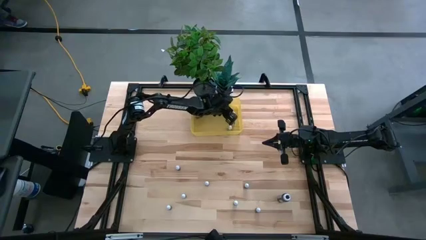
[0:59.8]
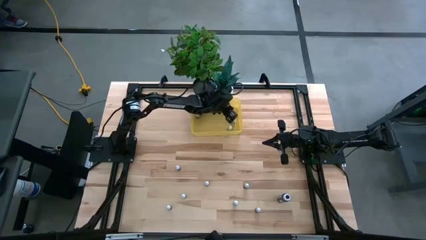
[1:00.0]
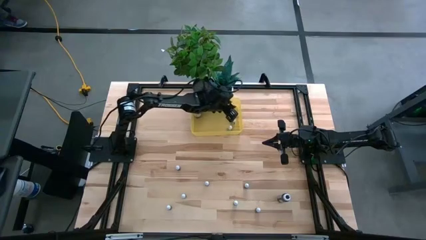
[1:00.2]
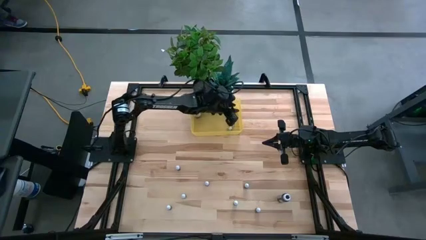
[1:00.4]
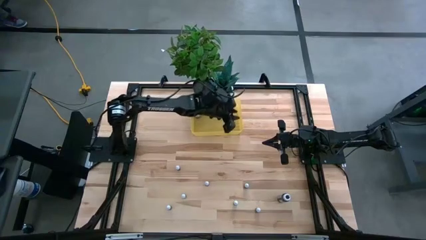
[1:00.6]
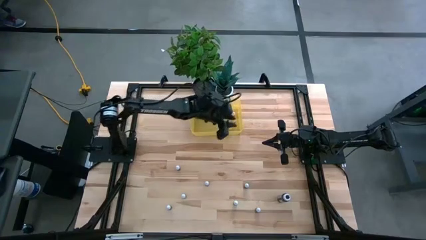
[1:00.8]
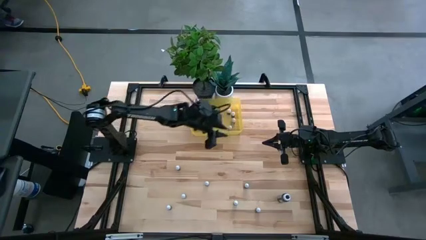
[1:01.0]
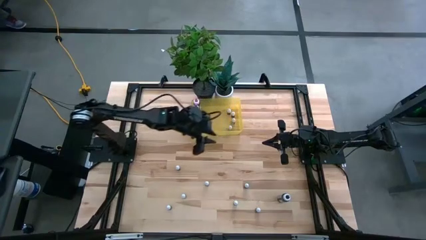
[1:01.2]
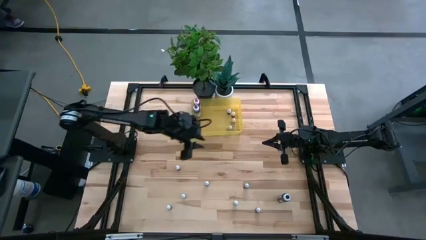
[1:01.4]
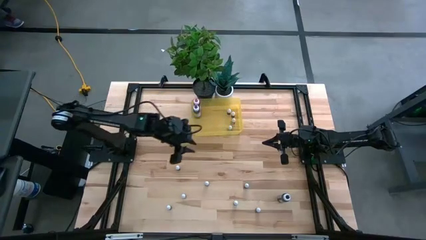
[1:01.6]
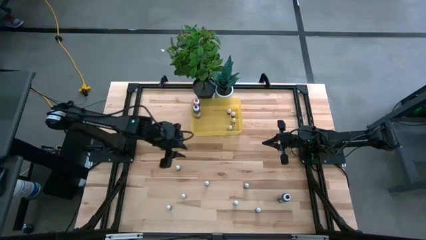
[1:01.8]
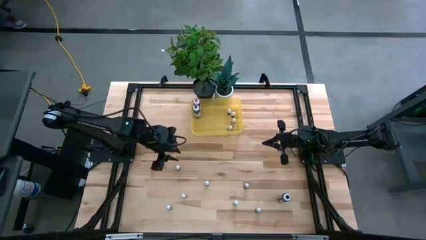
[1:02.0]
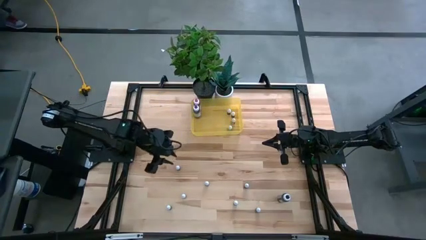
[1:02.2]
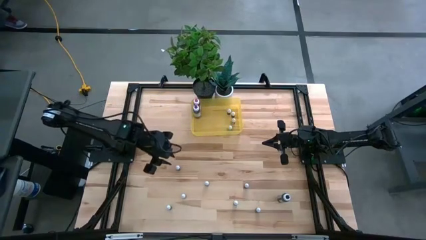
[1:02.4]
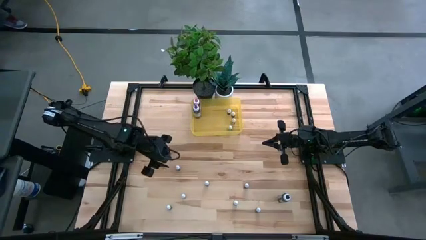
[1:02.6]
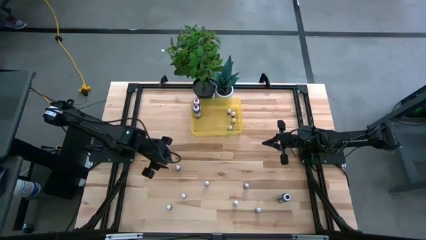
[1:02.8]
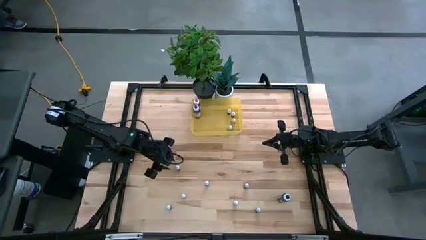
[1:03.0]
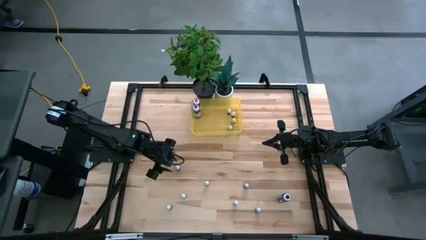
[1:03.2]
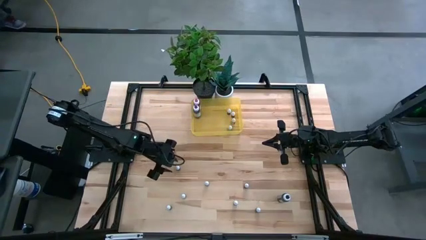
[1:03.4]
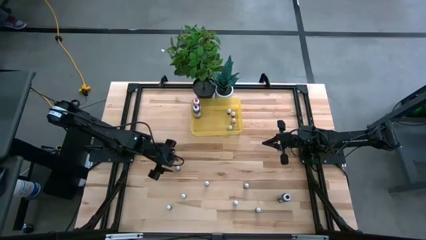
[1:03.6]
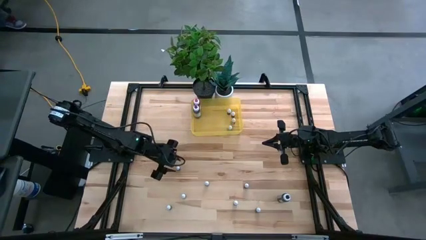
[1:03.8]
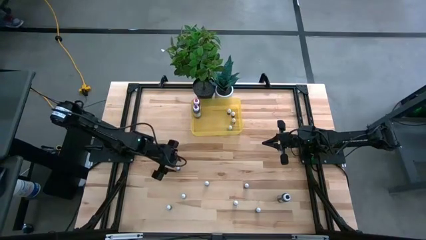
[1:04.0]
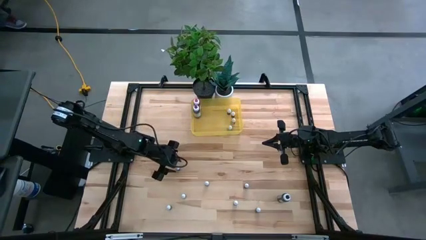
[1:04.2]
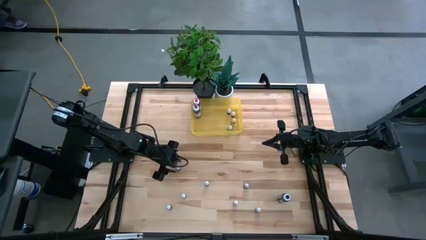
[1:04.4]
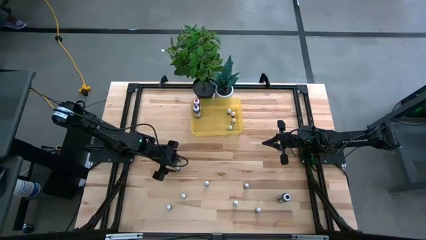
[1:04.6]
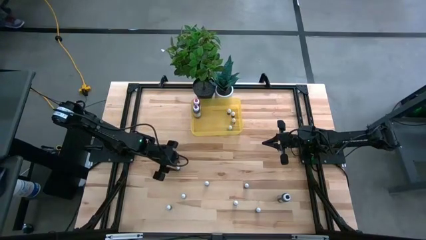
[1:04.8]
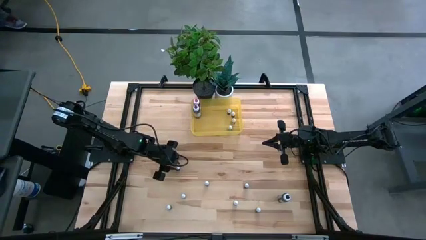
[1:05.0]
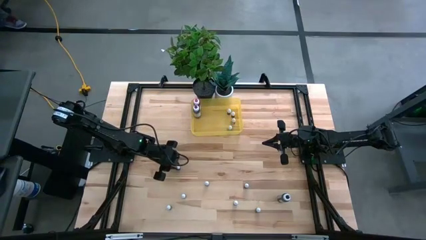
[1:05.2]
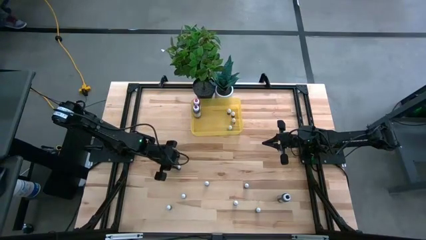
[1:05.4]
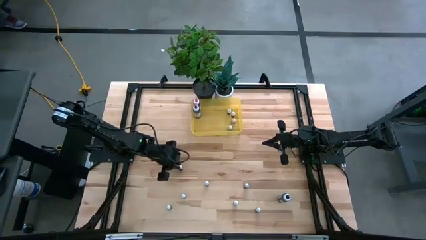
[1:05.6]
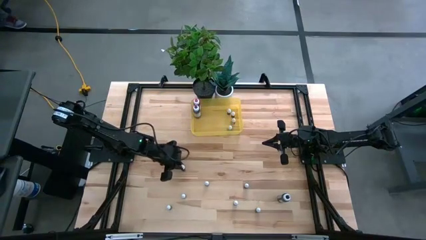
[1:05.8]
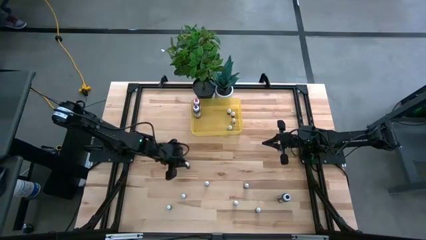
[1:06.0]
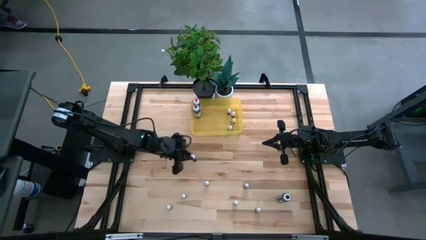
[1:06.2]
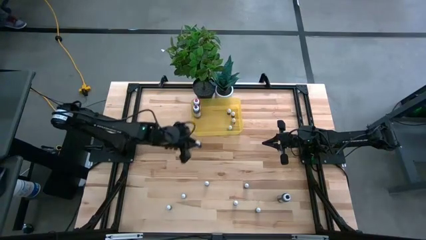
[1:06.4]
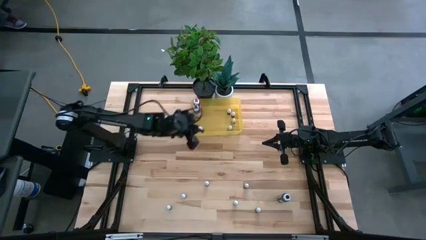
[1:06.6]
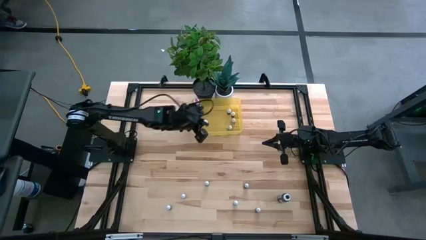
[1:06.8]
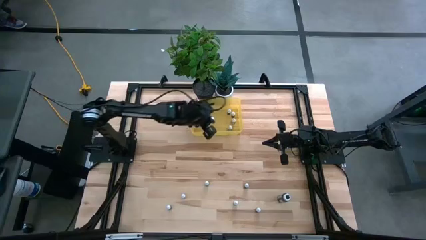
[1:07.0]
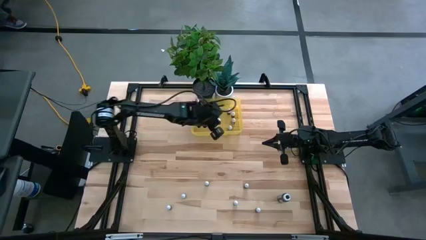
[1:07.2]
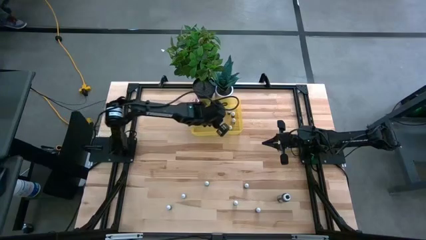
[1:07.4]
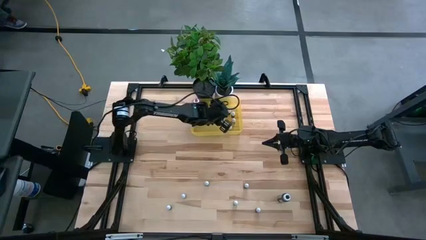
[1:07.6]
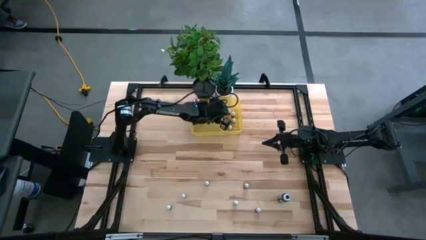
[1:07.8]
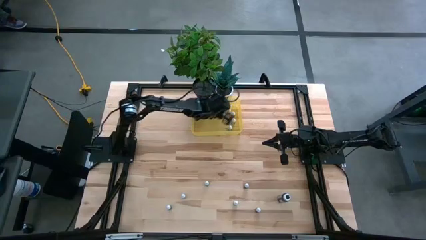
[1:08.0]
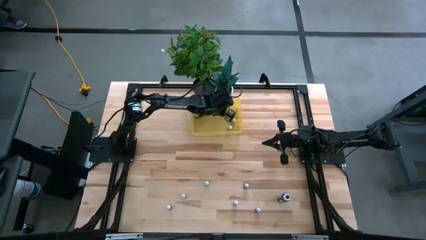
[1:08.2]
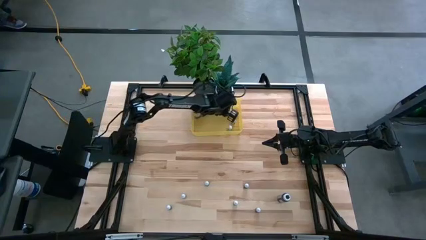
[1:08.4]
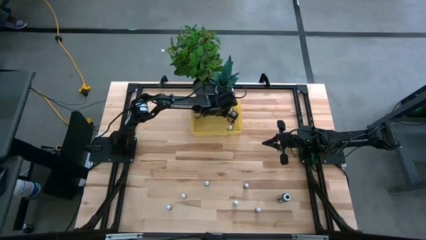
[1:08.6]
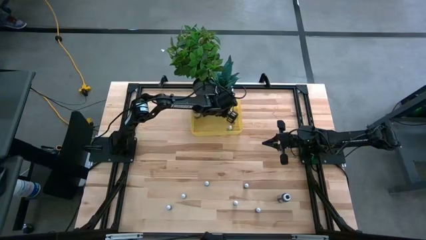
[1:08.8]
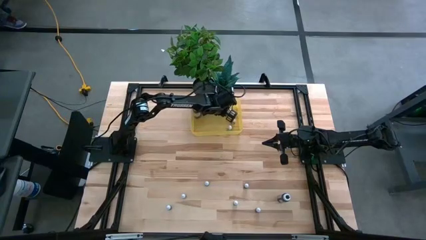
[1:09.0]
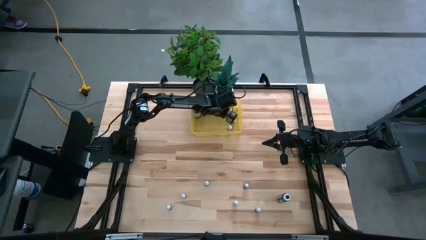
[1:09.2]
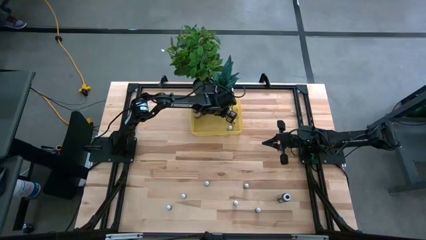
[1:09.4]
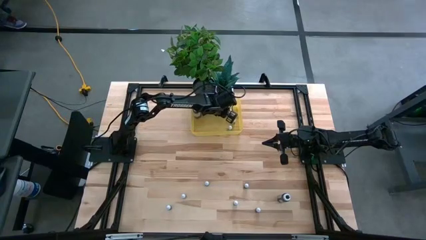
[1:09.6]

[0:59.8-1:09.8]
Task: Pick & Place food coloring
Put the top left small green food coloring bottle into the yellow bin

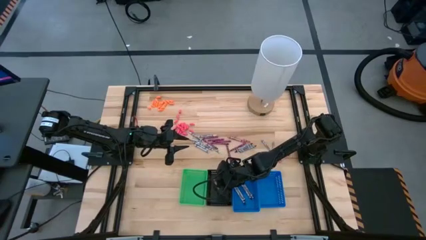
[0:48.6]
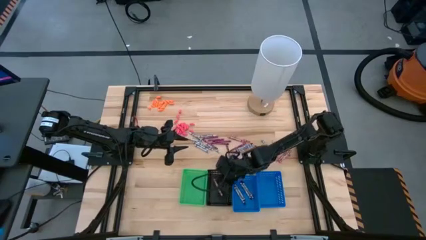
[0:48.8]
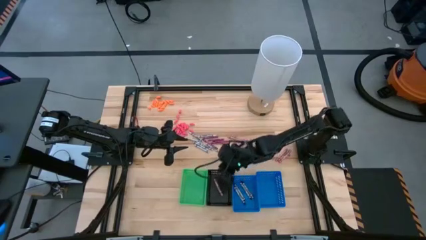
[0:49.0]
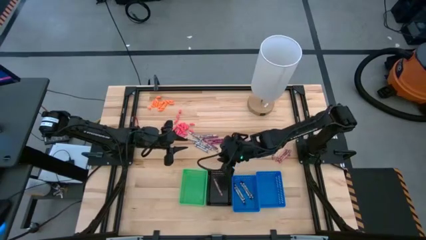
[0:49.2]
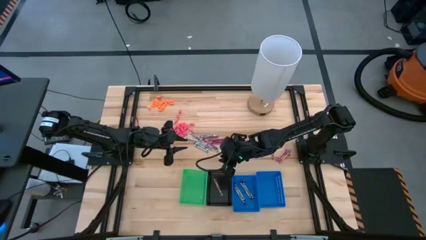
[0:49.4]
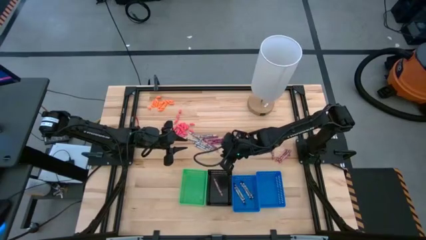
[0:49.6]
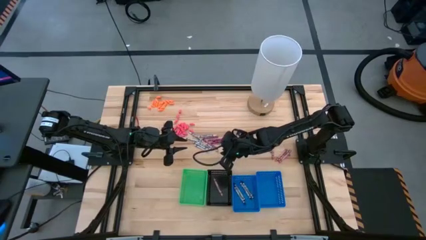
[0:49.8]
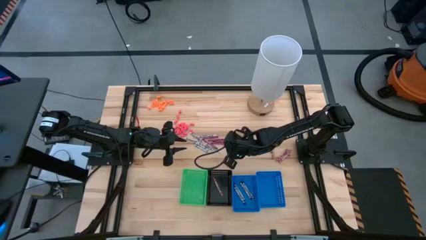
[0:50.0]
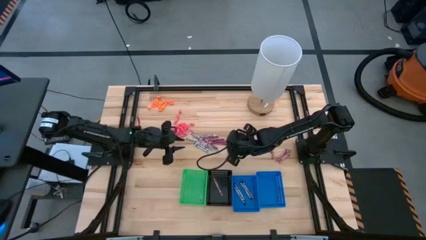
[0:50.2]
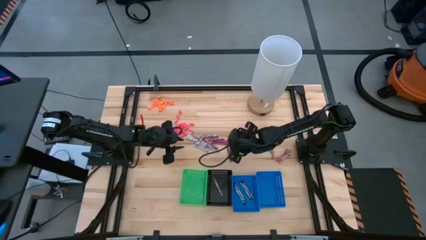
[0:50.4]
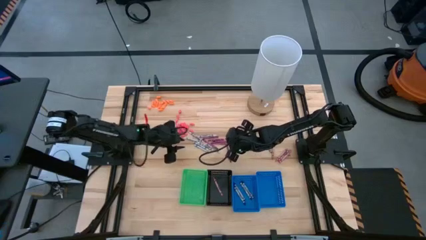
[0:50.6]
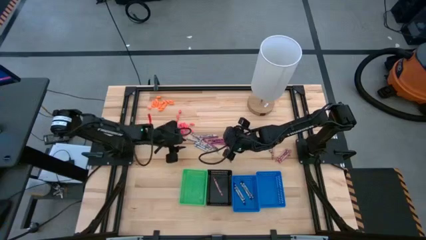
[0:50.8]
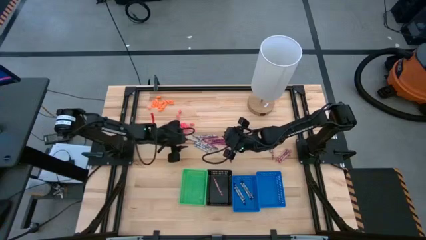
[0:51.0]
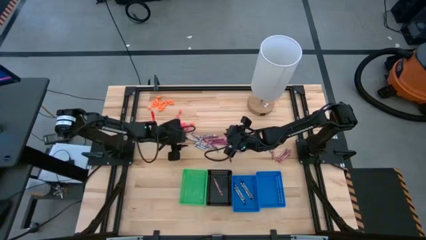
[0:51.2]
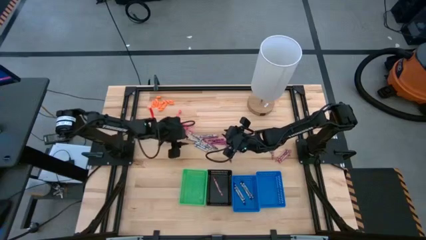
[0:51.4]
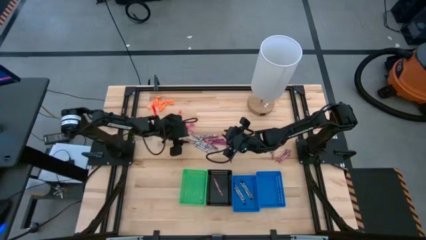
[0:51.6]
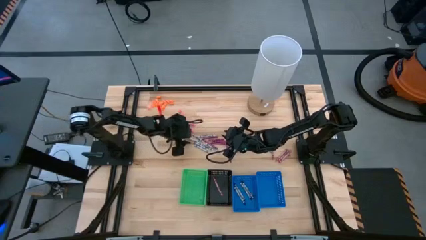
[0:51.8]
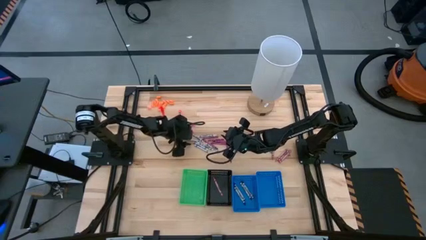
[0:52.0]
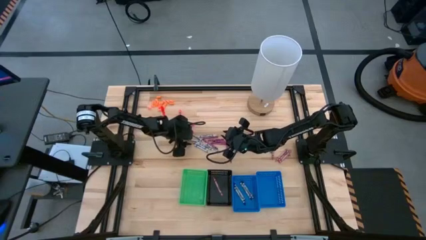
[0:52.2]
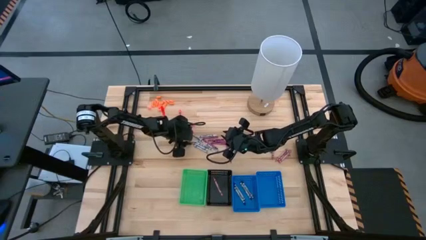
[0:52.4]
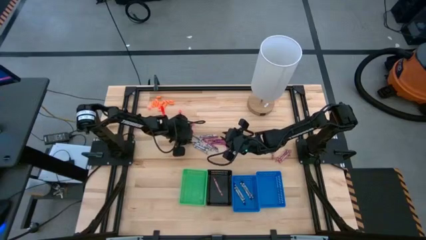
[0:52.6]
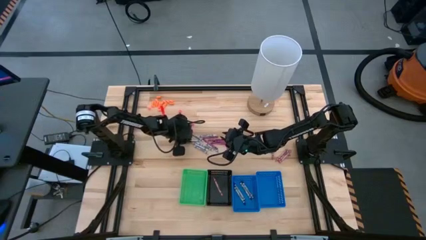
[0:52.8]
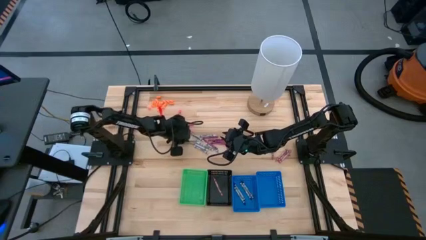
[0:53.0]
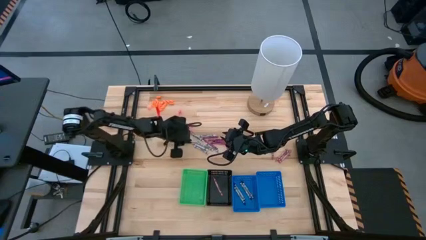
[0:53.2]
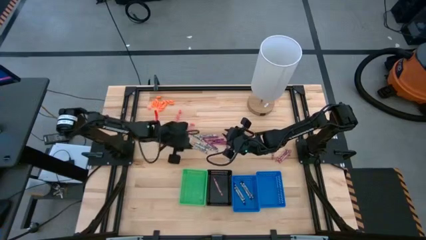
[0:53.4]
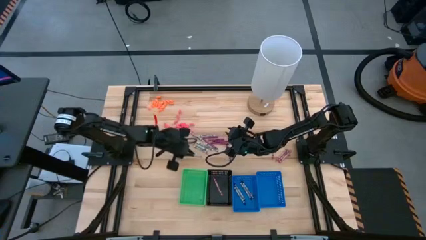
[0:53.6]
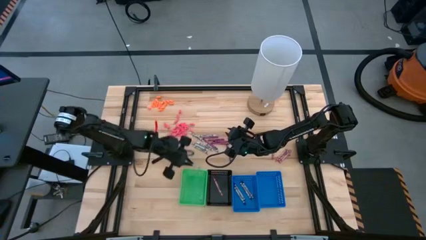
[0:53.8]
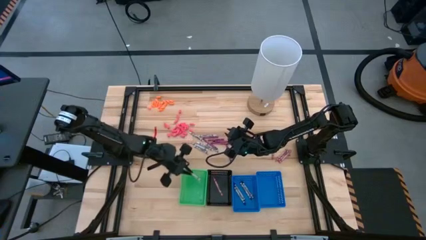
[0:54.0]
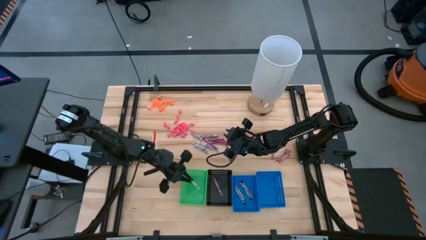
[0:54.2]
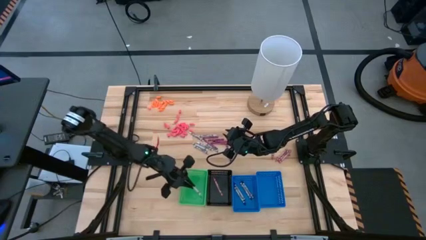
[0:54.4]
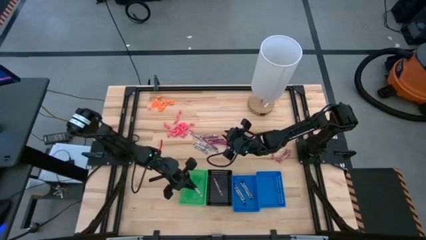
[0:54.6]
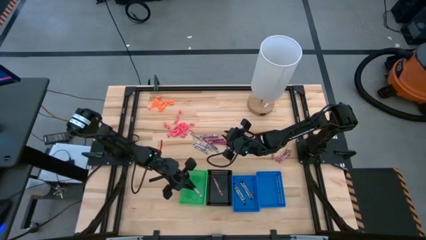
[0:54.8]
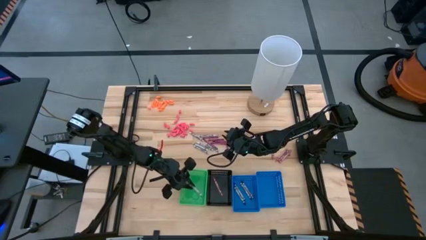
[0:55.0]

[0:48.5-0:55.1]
Task: Sort crayons
Put the white crayon into the green bin
